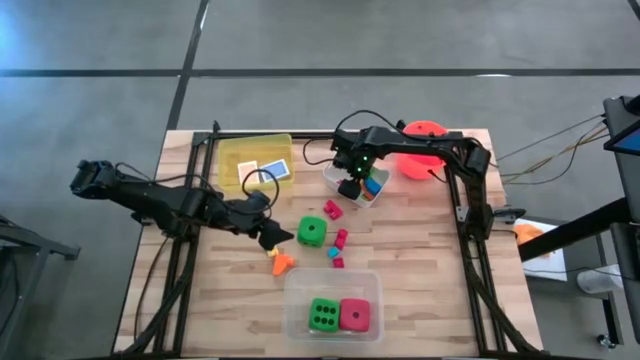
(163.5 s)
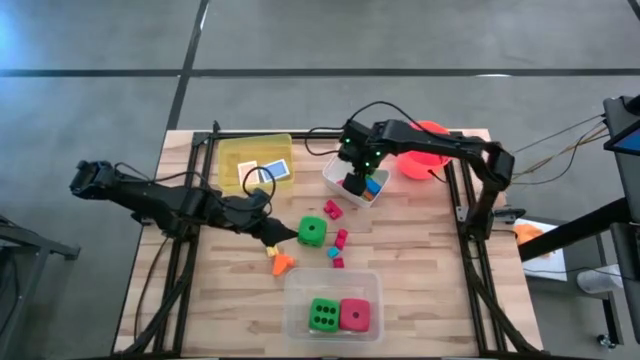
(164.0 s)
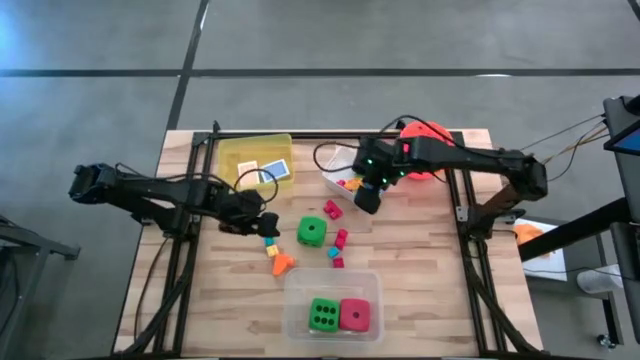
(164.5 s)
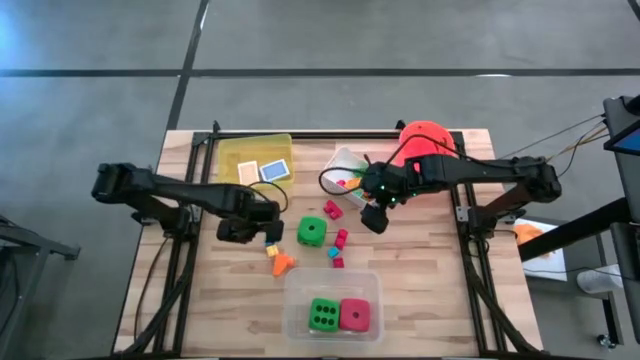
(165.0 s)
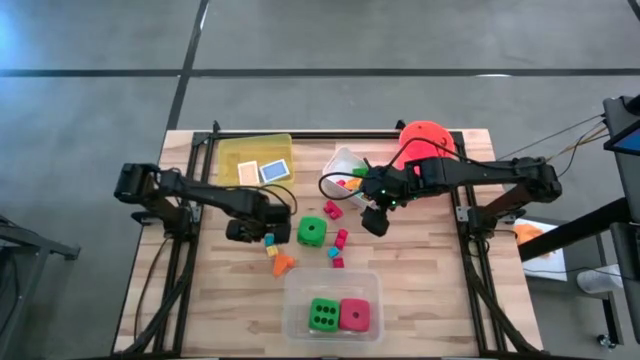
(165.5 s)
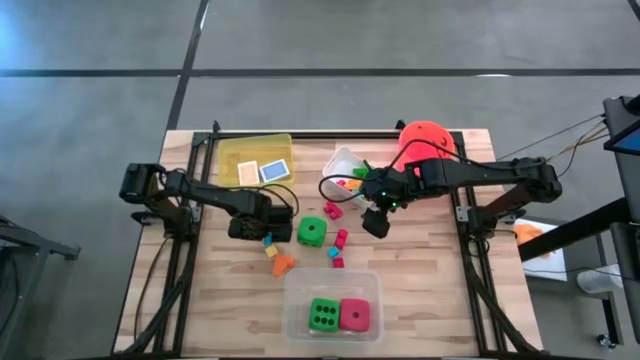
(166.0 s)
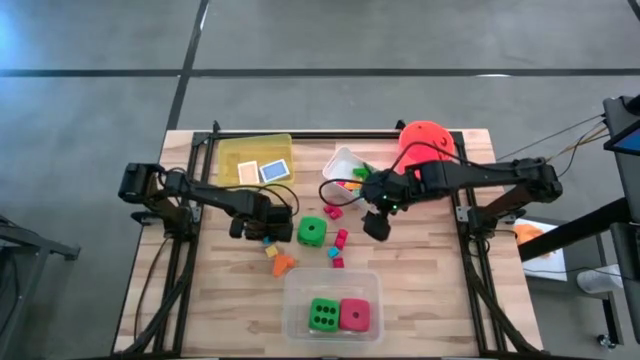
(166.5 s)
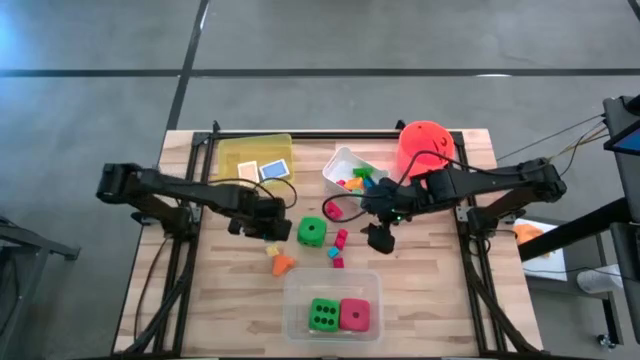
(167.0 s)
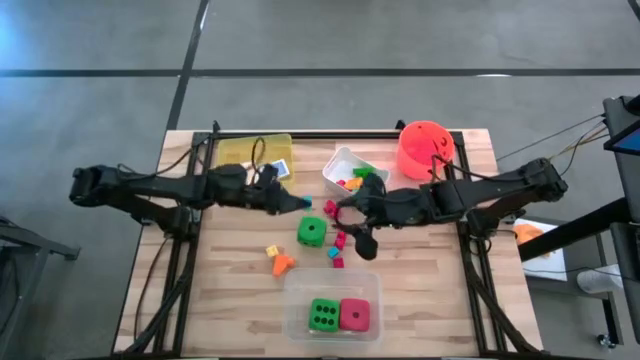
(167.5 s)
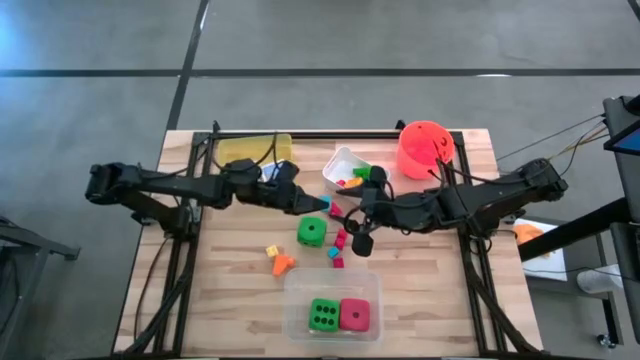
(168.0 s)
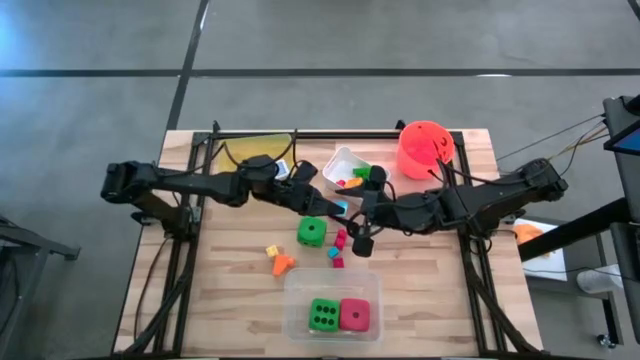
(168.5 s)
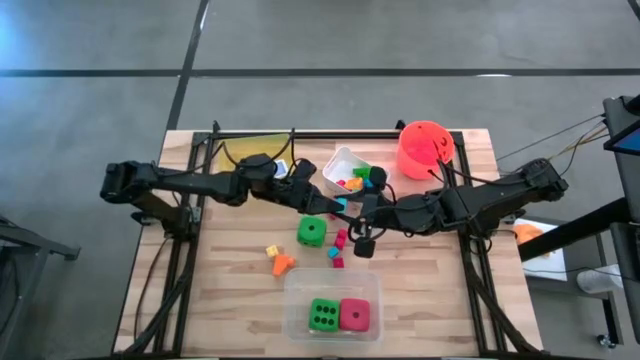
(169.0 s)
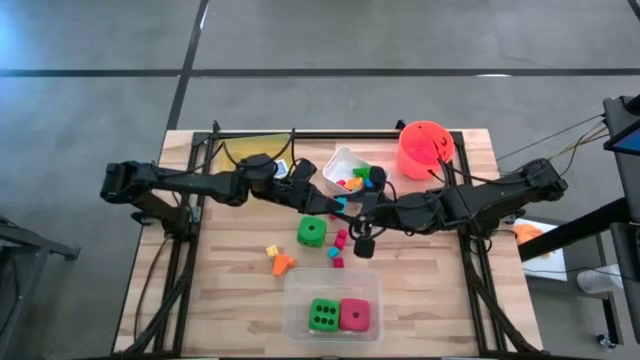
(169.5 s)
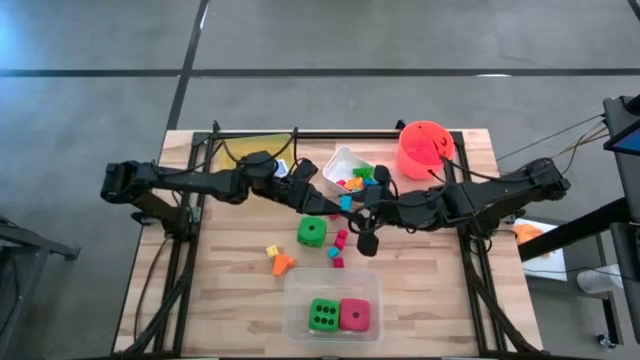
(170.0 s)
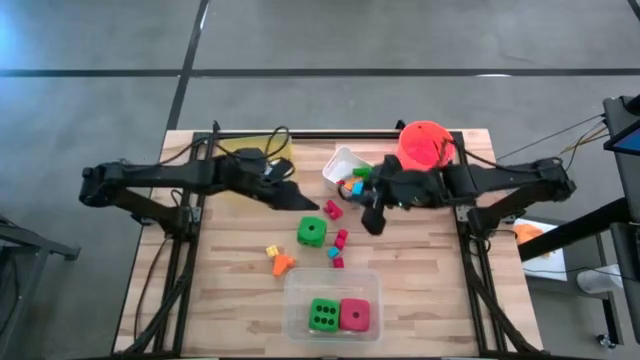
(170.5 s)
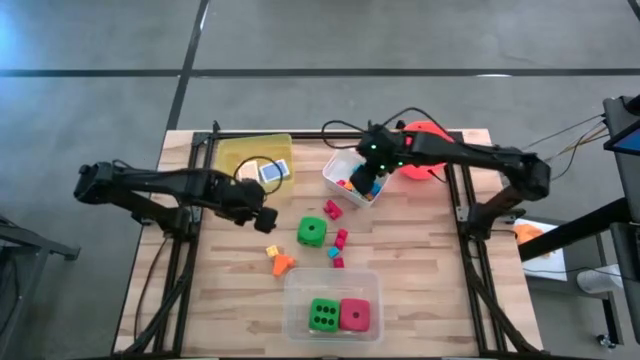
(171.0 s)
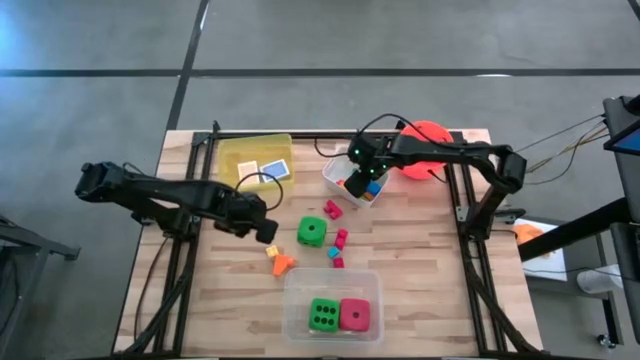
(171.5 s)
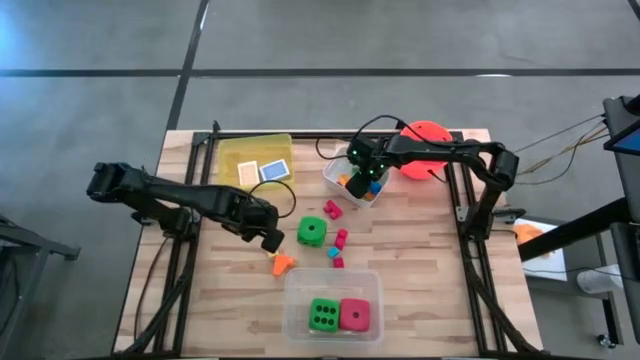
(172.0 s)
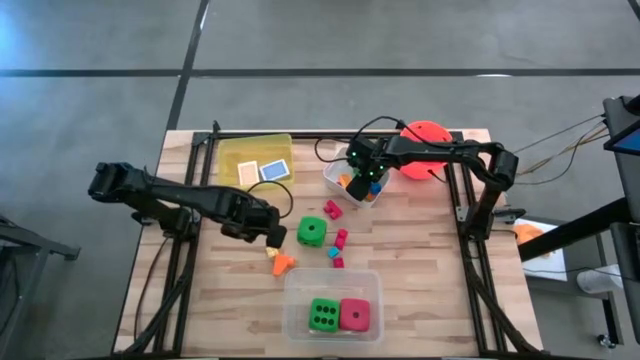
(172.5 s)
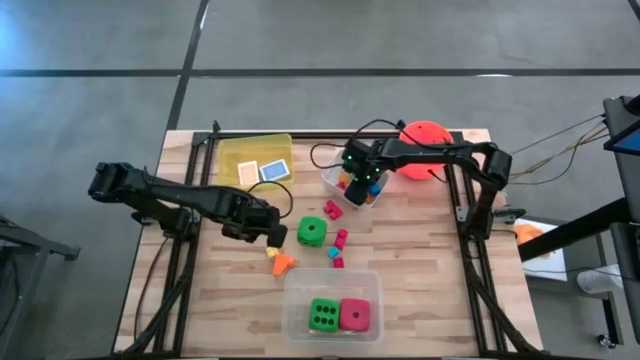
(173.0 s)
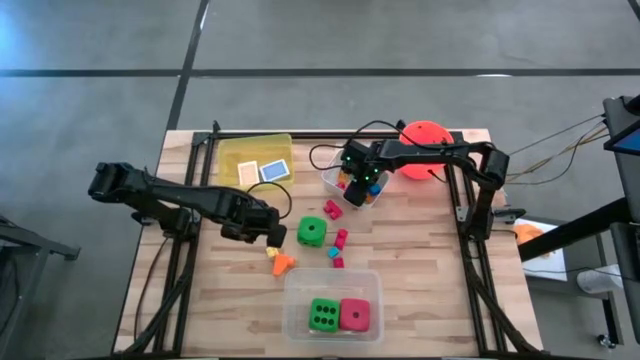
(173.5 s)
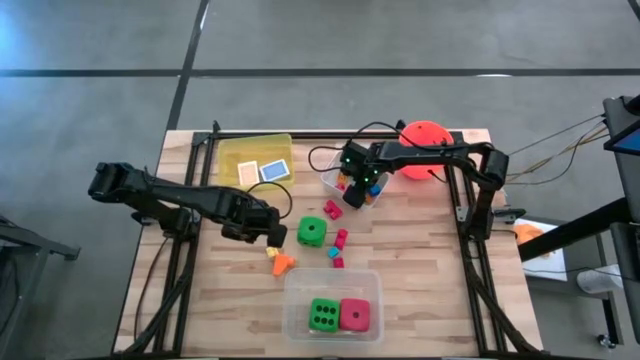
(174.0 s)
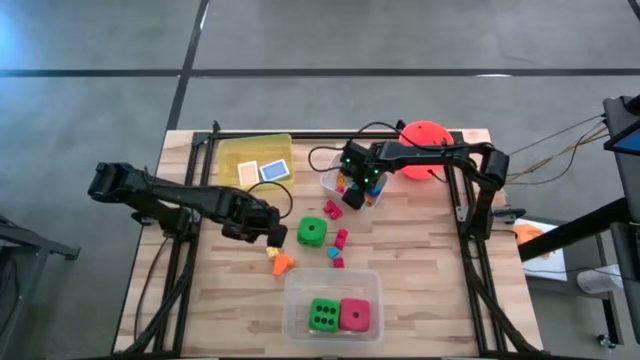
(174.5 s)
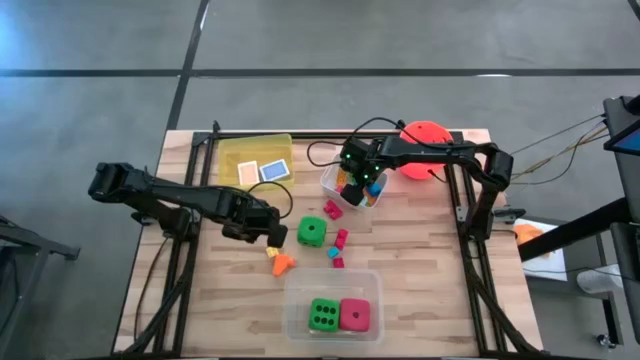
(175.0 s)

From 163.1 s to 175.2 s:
Task: Pick & Place Toys
Put the blue game piece into the white bin

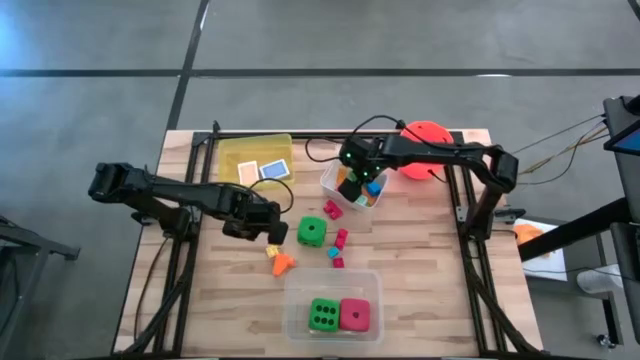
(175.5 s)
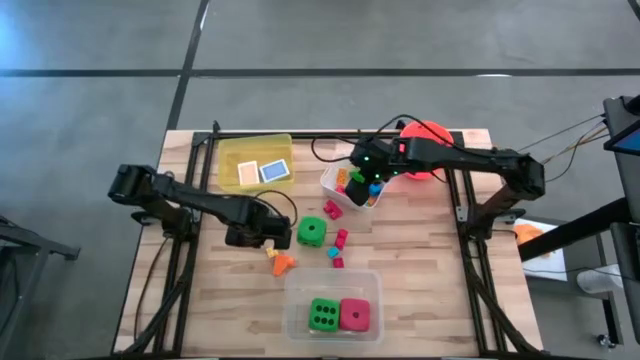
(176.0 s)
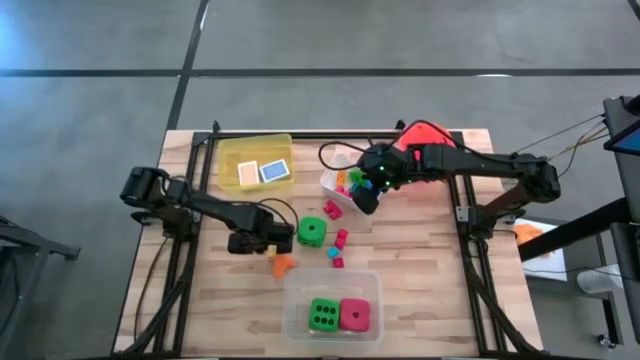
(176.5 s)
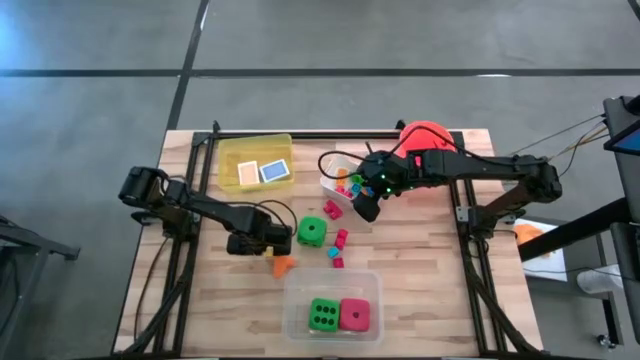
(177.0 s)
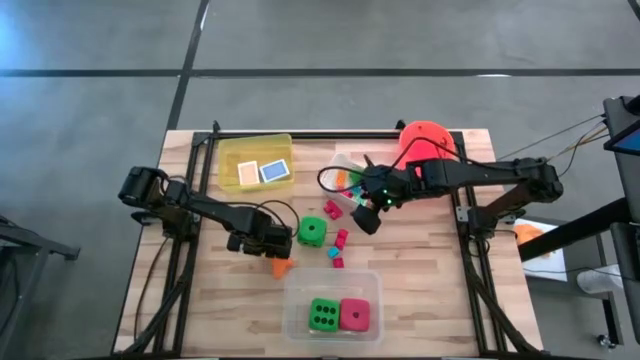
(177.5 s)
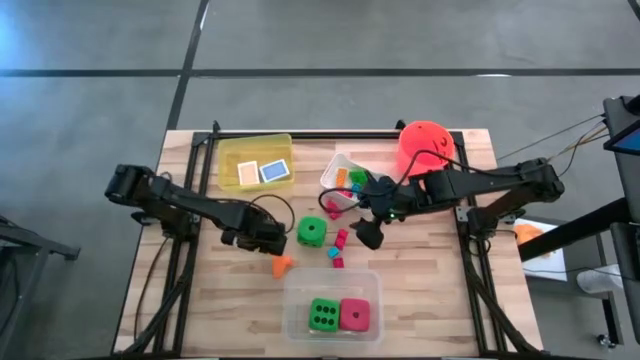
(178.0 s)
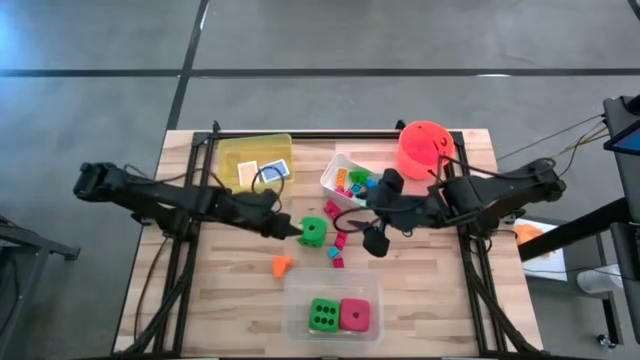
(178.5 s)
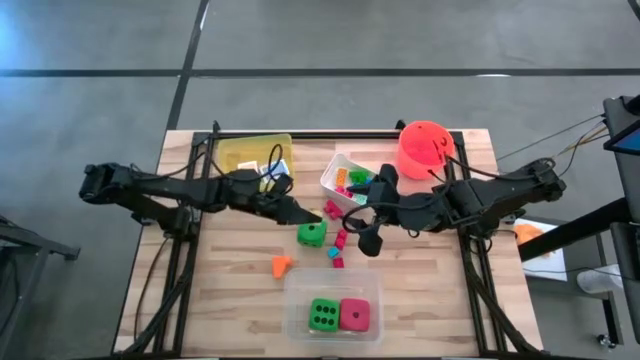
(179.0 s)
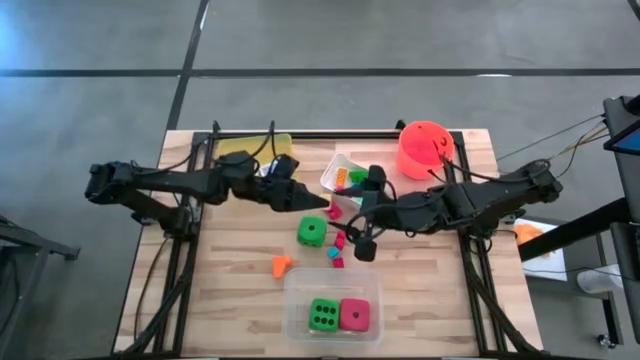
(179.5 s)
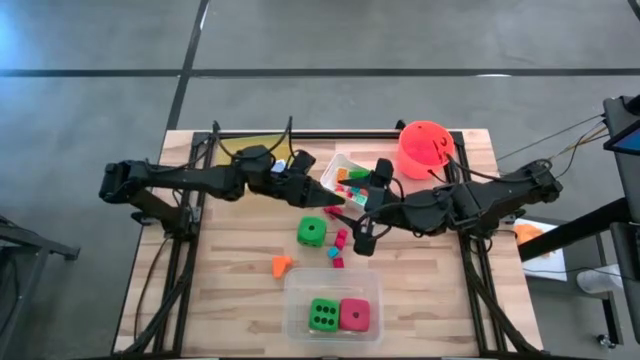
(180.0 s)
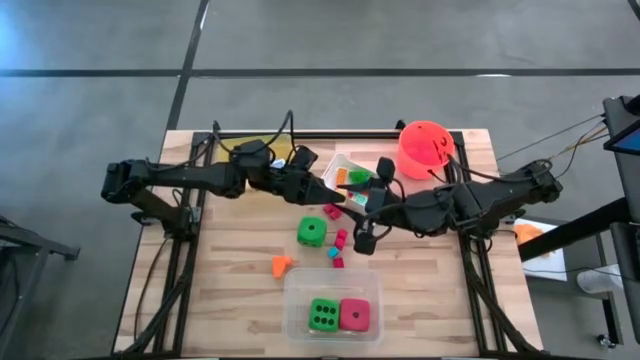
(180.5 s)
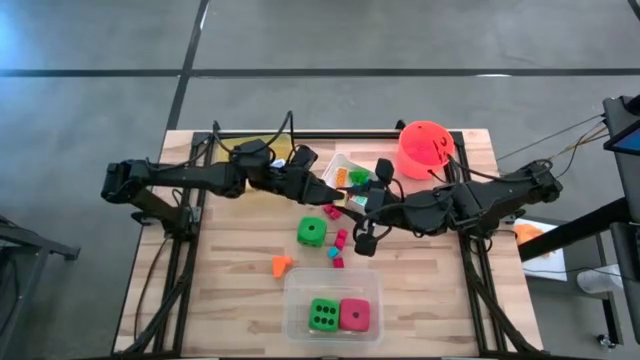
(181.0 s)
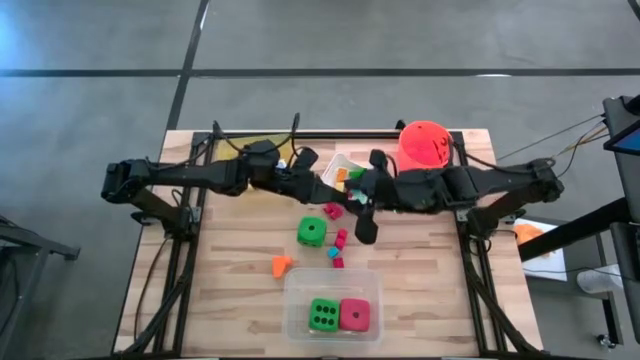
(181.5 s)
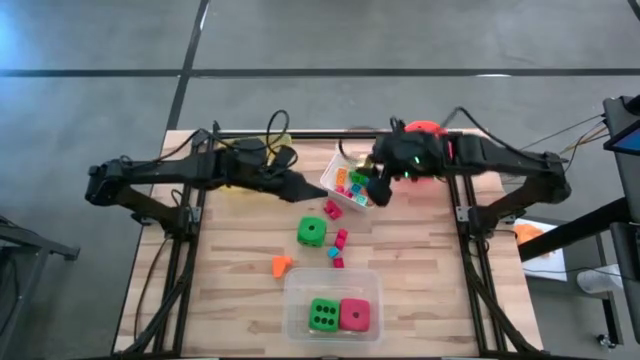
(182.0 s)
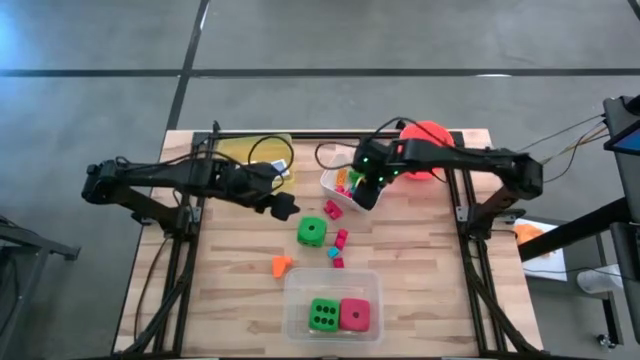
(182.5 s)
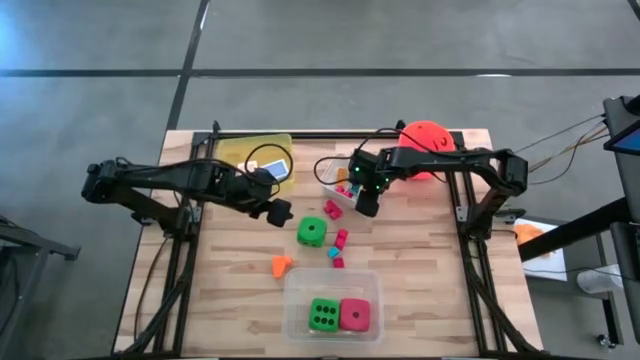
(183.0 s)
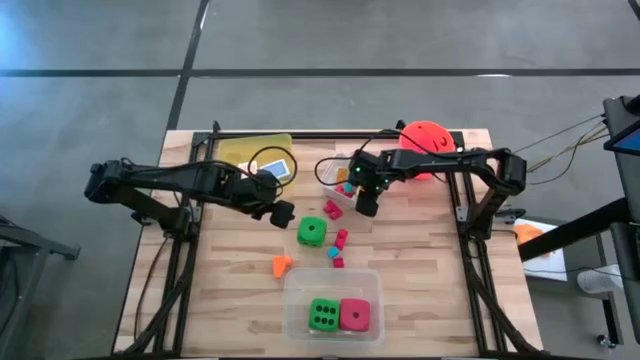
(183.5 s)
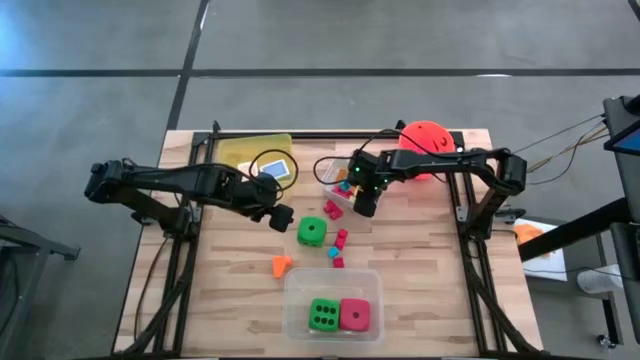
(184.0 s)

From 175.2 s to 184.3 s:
Put the yellow game piece into the white bin
